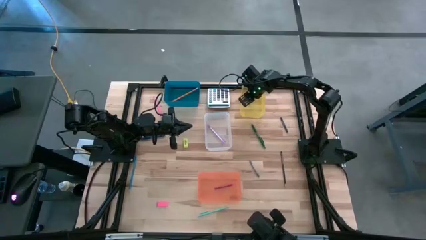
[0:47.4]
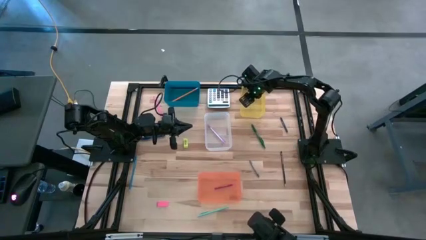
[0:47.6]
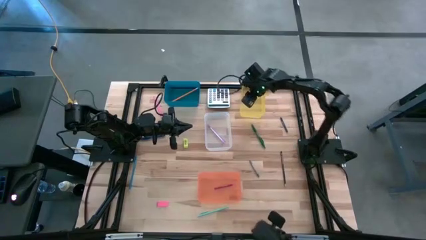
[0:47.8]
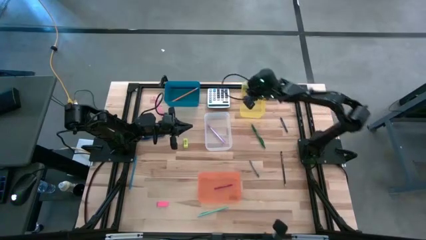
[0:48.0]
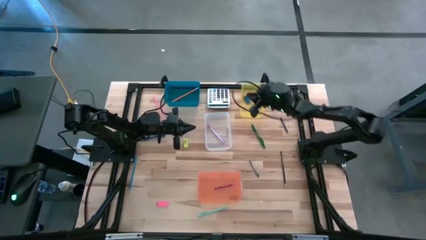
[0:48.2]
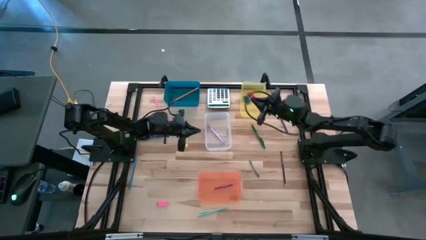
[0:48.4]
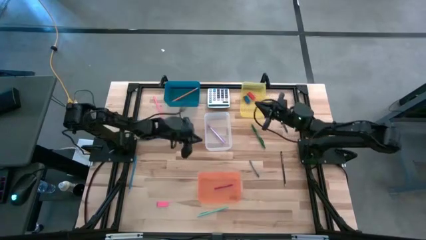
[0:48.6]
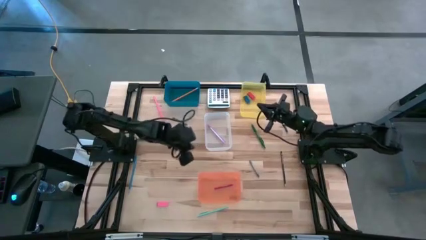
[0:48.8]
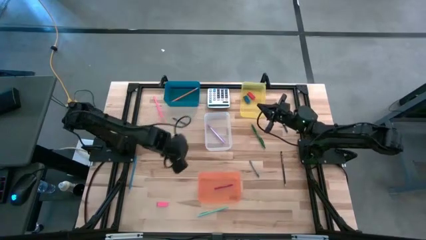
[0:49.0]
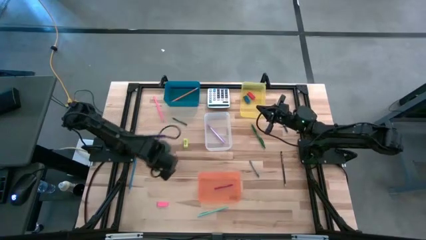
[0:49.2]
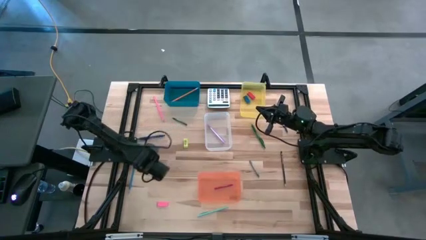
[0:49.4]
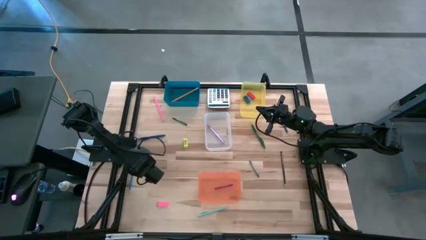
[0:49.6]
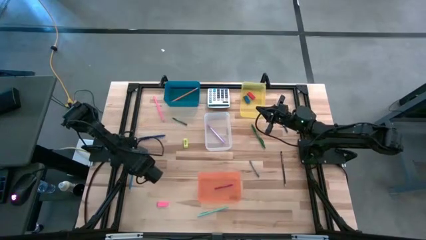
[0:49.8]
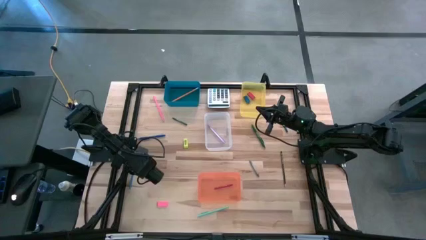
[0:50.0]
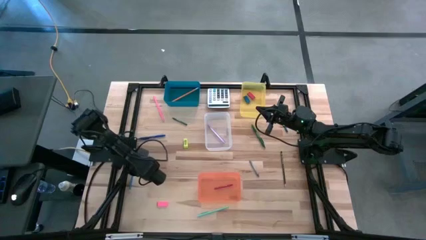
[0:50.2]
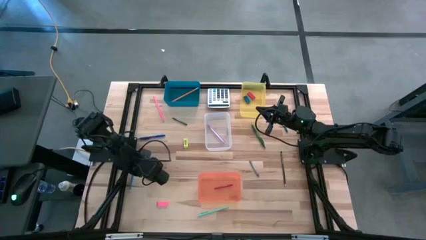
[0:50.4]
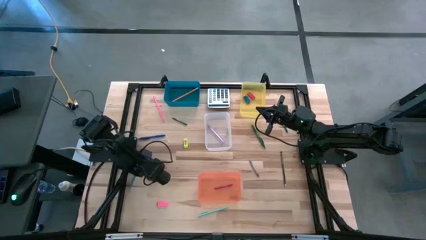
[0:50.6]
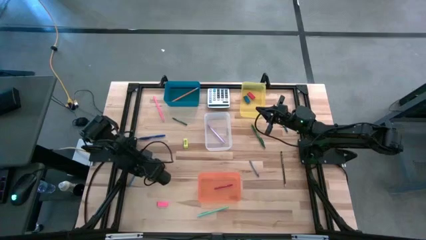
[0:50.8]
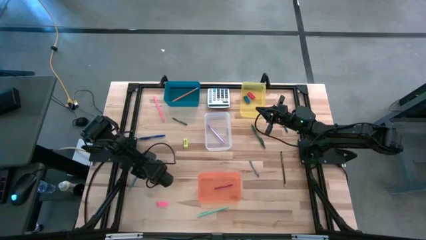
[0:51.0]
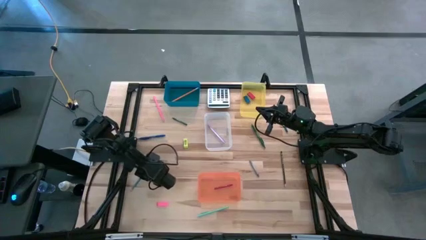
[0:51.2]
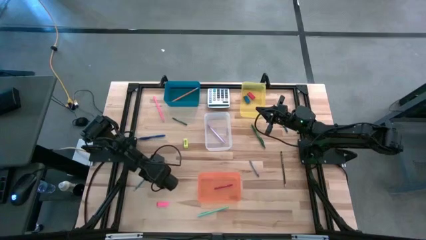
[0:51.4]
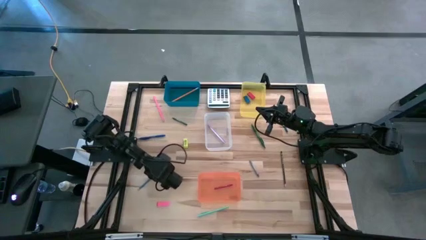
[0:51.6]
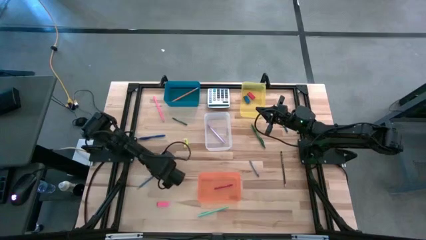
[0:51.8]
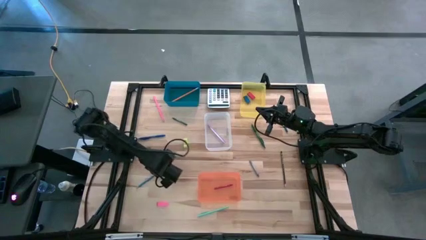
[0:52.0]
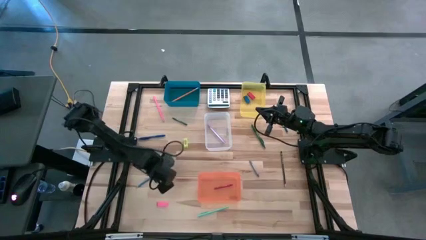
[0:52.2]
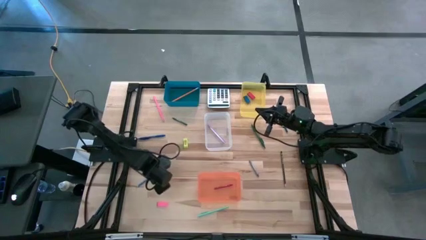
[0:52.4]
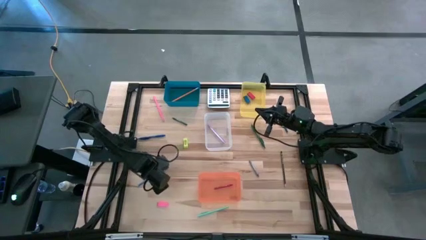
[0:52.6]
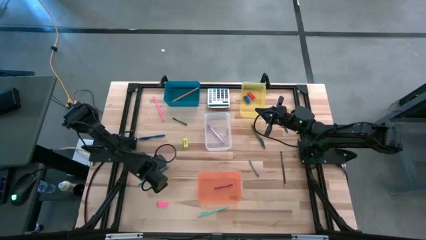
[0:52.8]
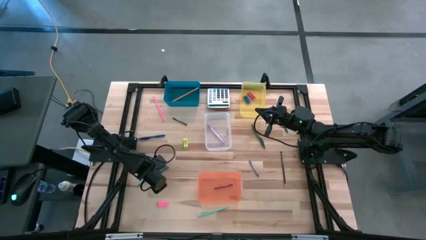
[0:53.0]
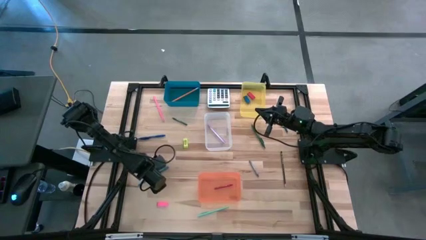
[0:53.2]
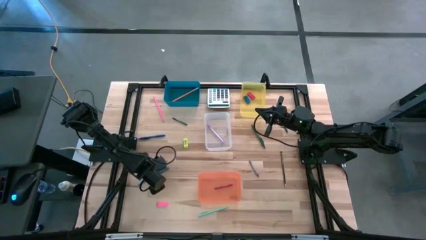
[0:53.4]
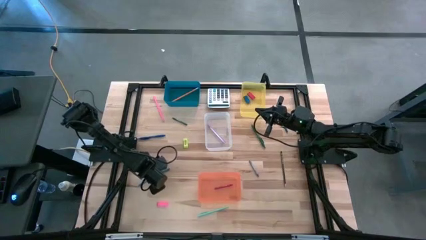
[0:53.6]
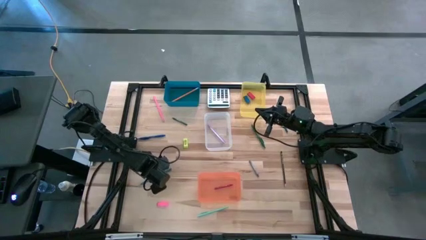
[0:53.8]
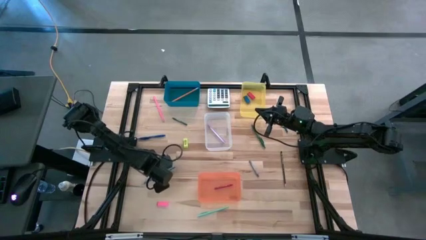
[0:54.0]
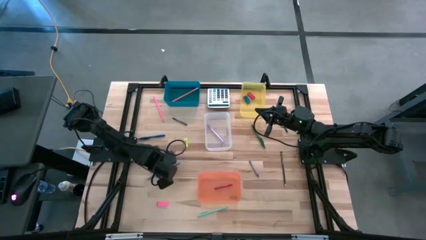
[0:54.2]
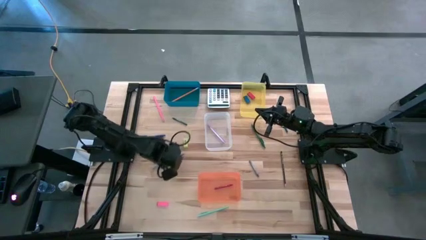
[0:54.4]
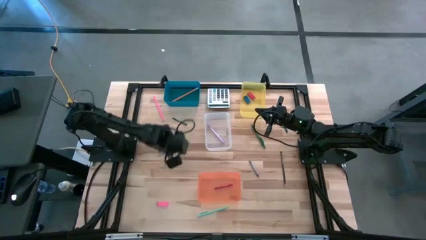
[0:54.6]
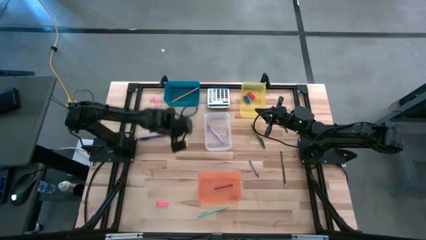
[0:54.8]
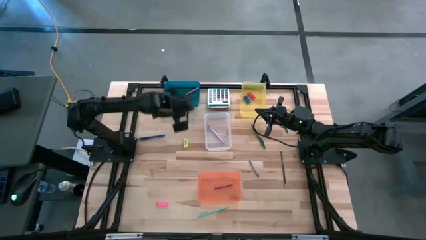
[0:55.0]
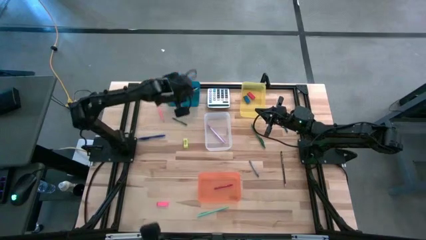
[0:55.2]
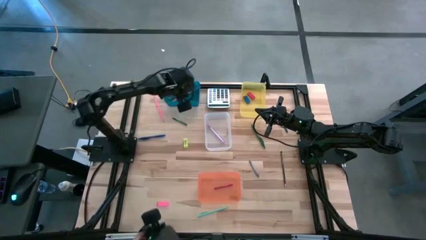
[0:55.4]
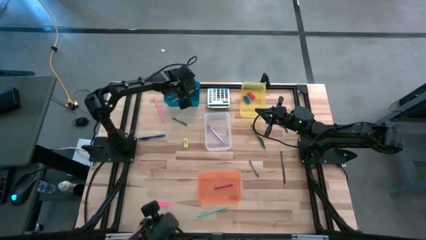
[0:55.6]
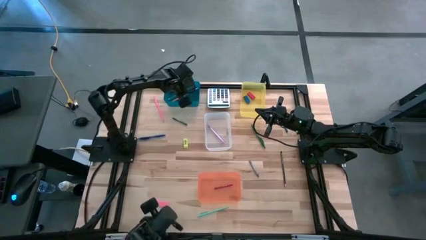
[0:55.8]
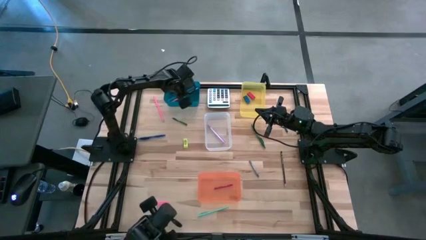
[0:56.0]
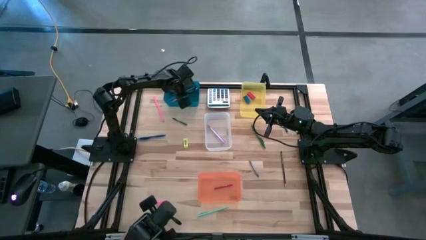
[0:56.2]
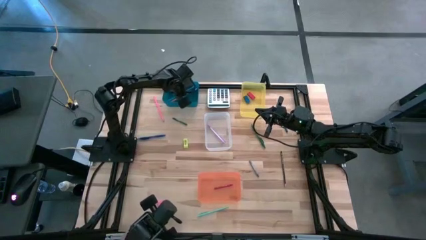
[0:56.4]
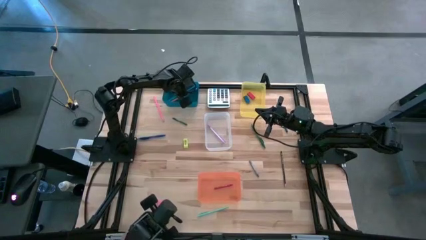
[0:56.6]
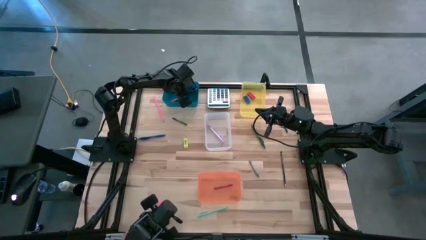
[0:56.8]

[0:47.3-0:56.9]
Task: Sort crayons/erasers/pens/pencils in bins
Put the light blue pencil into the blue bin

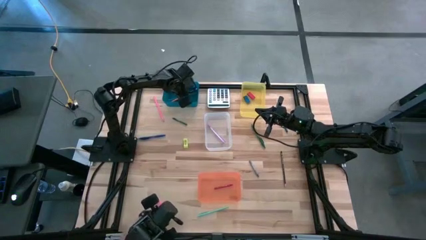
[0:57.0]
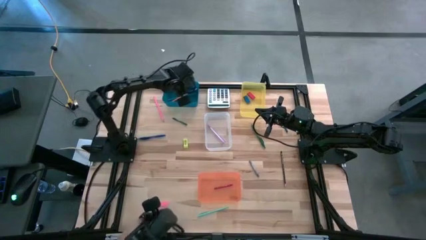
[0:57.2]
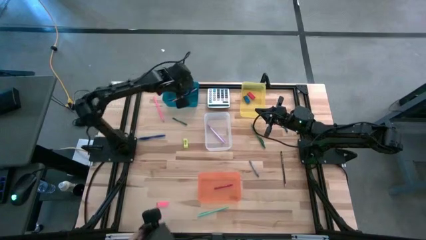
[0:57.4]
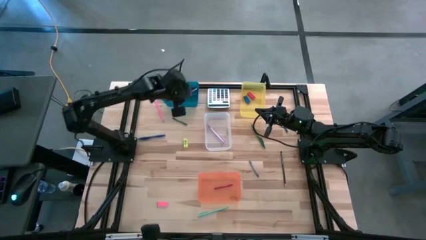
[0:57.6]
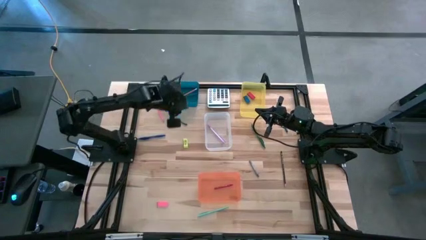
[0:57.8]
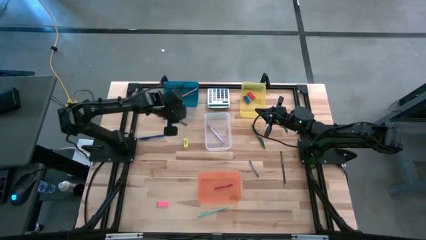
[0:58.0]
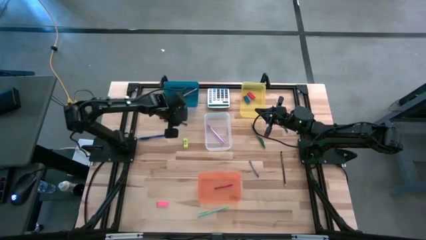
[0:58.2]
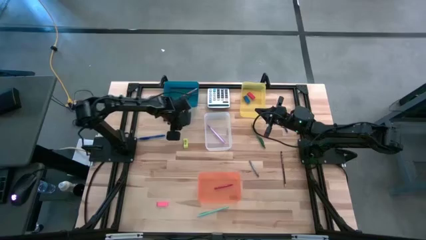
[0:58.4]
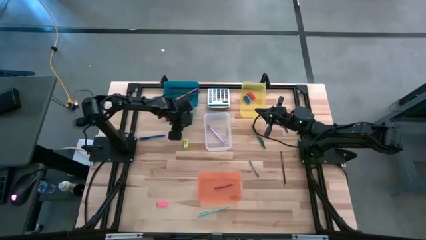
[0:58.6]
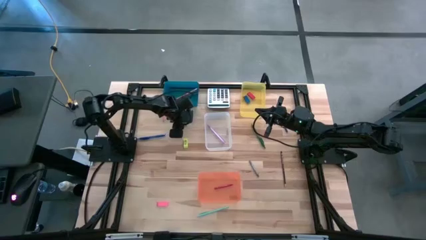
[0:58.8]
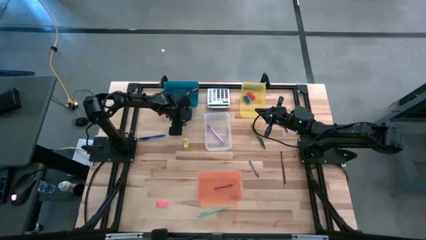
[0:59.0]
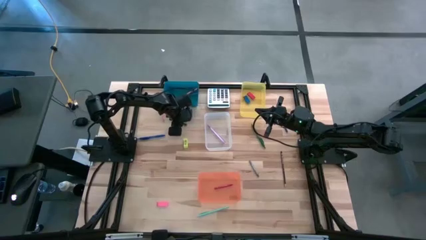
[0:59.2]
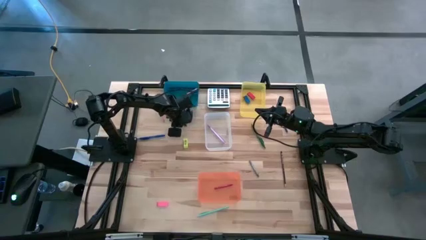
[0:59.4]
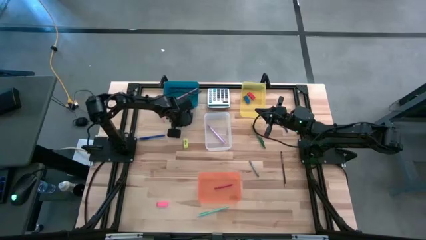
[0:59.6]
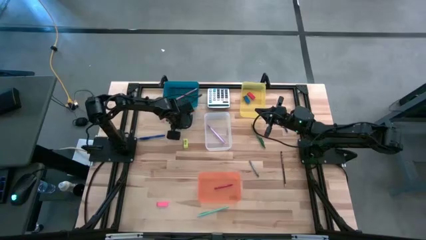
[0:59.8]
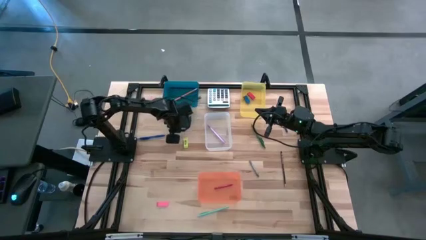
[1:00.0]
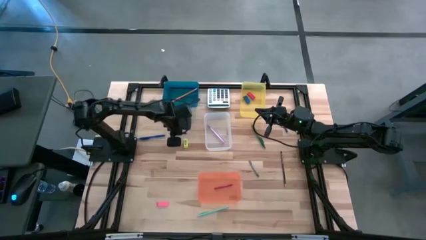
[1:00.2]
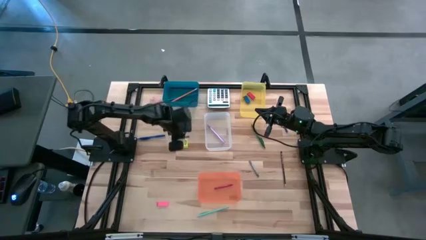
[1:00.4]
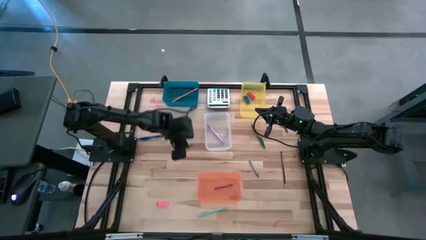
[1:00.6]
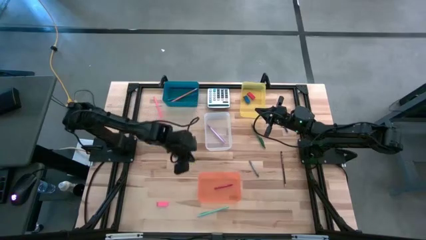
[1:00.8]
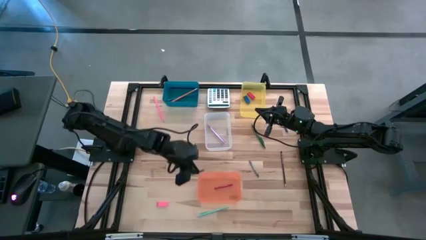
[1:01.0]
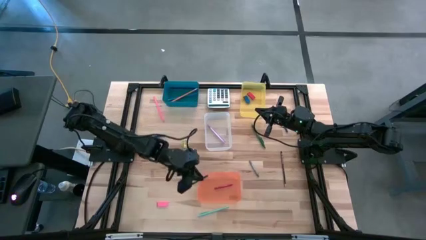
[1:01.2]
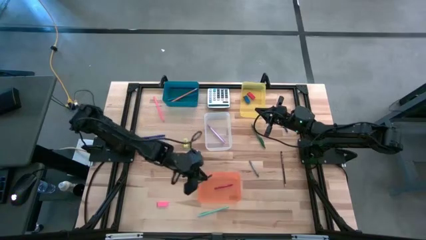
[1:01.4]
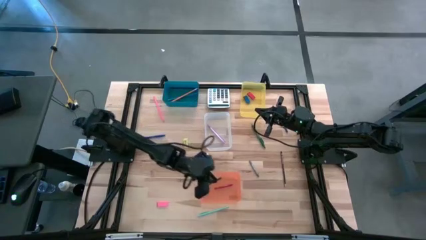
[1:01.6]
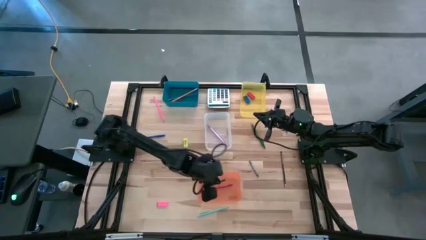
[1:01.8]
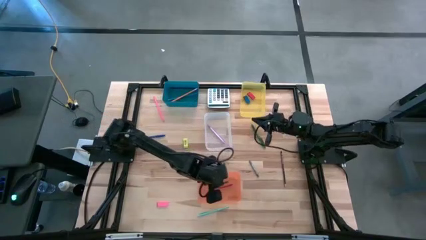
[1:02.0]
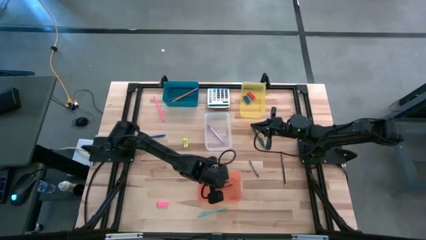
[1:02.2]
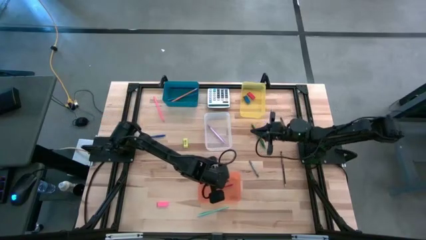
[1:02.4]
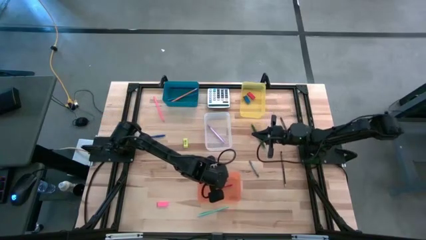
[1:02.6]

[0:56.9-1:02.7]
Put the green crayon into the orange bin
